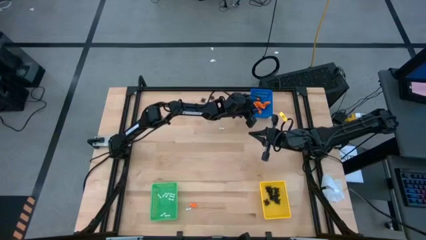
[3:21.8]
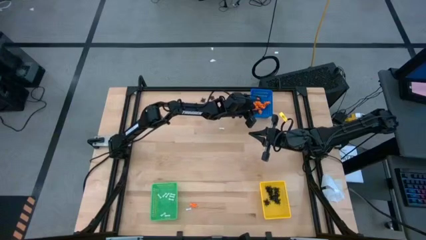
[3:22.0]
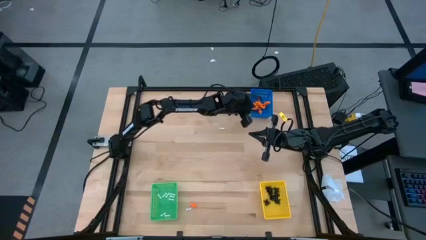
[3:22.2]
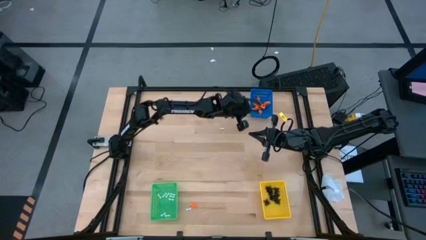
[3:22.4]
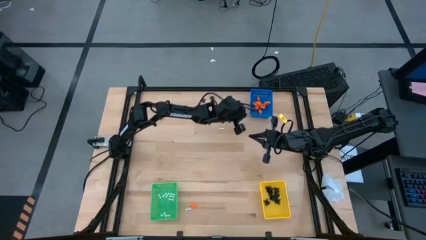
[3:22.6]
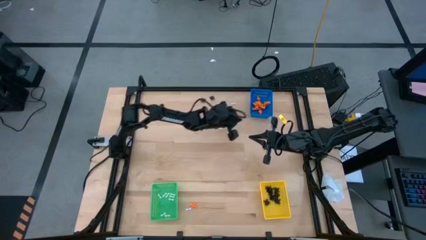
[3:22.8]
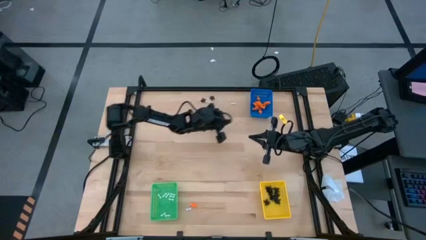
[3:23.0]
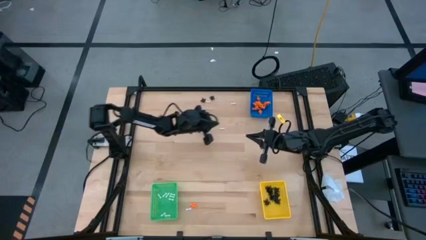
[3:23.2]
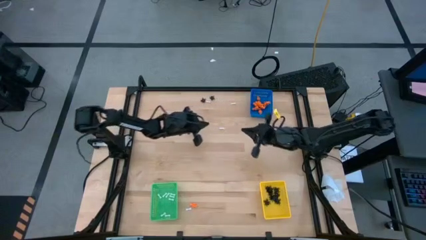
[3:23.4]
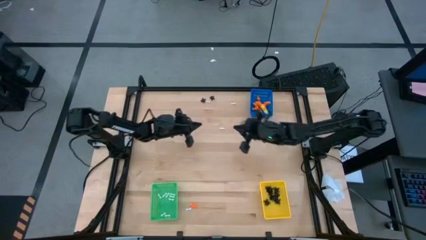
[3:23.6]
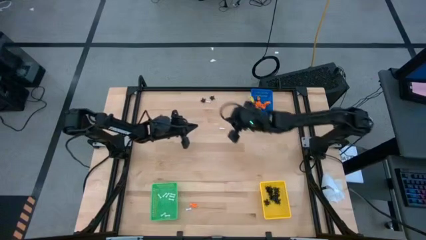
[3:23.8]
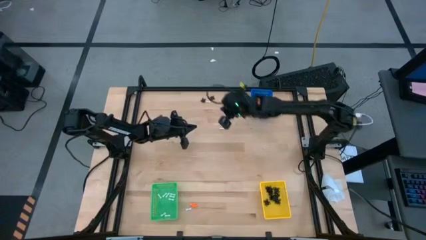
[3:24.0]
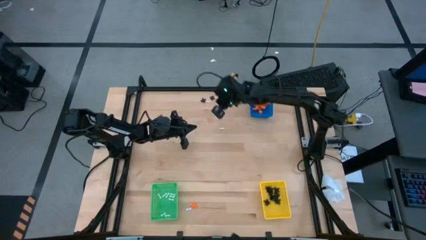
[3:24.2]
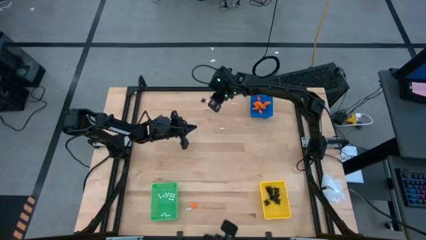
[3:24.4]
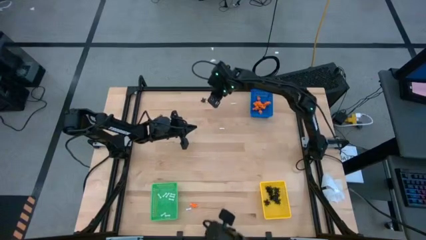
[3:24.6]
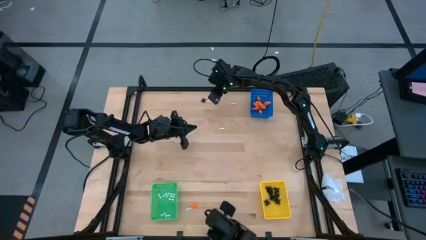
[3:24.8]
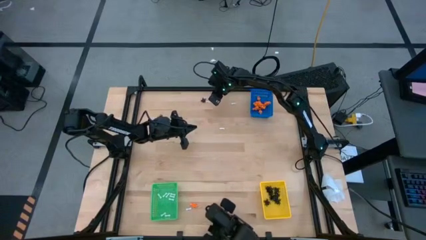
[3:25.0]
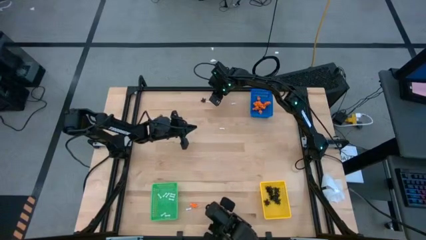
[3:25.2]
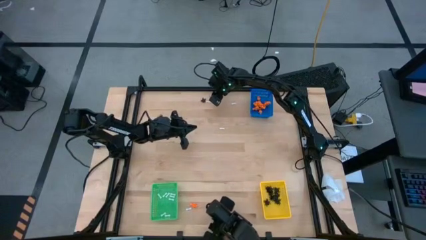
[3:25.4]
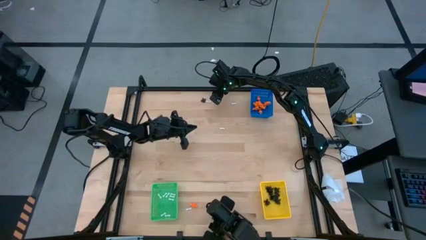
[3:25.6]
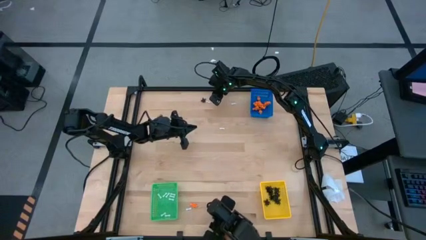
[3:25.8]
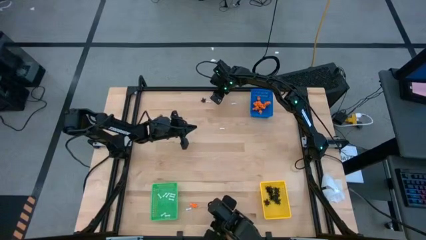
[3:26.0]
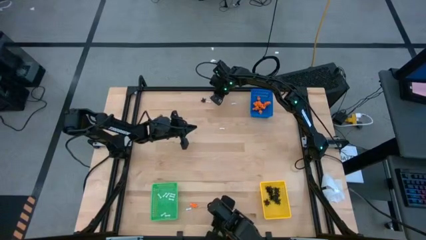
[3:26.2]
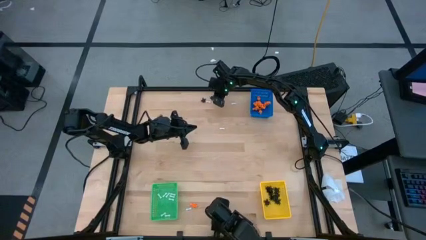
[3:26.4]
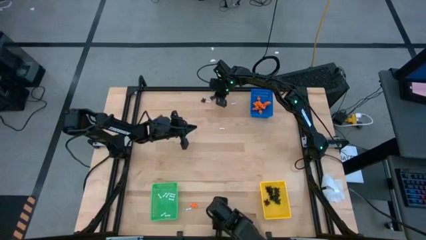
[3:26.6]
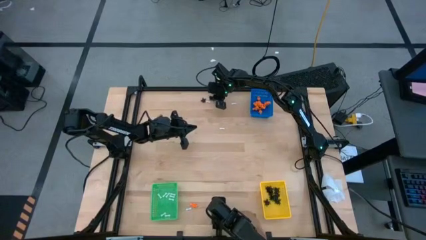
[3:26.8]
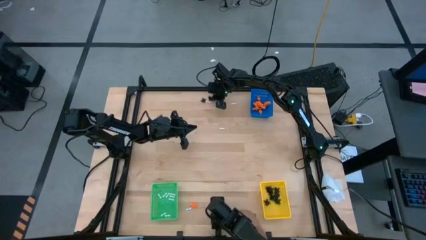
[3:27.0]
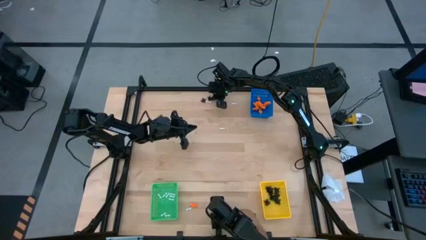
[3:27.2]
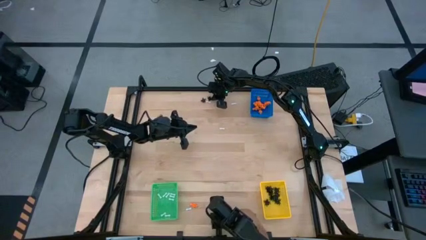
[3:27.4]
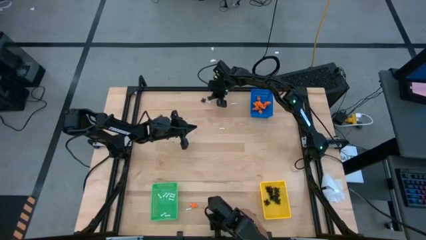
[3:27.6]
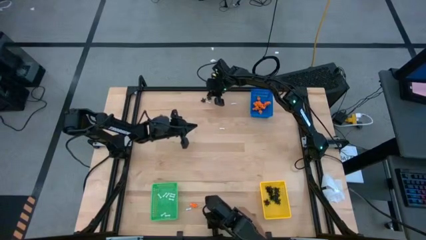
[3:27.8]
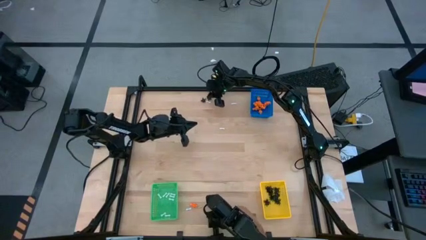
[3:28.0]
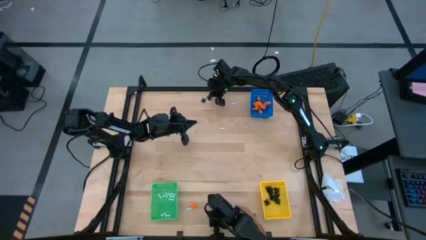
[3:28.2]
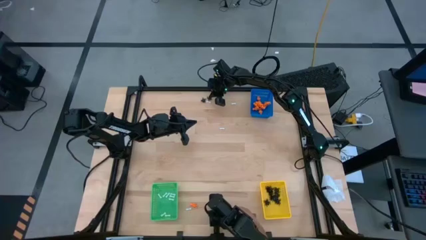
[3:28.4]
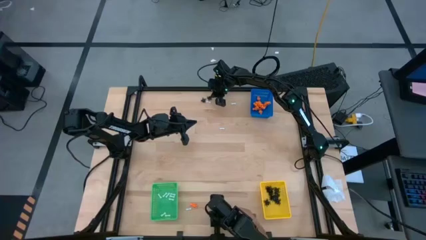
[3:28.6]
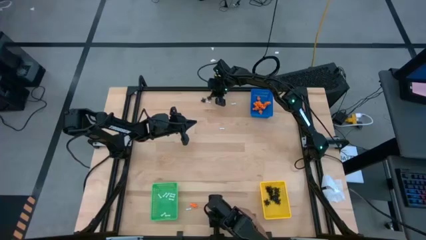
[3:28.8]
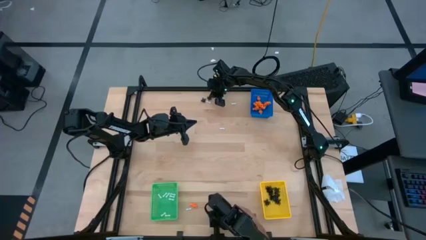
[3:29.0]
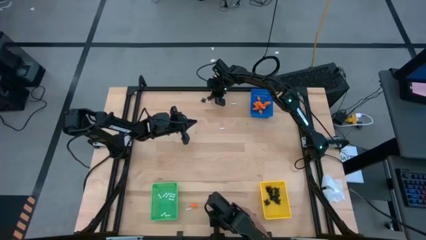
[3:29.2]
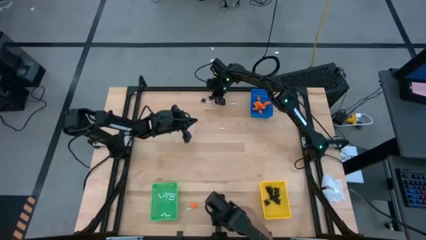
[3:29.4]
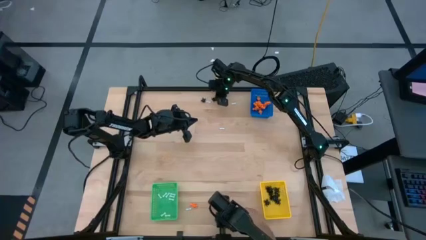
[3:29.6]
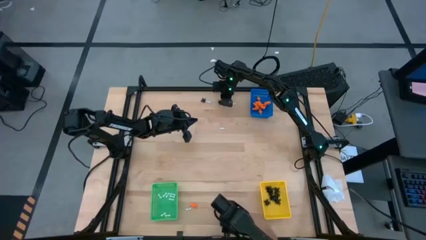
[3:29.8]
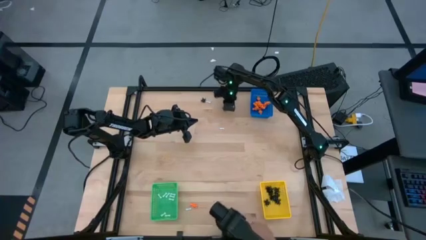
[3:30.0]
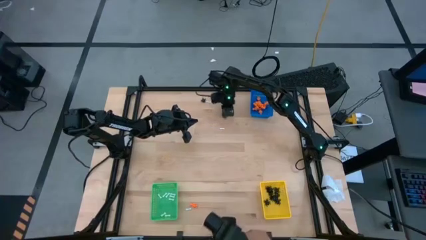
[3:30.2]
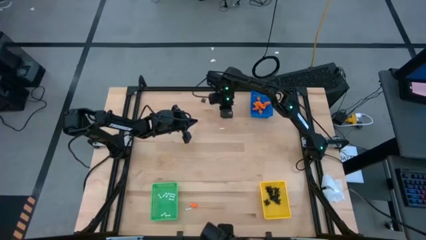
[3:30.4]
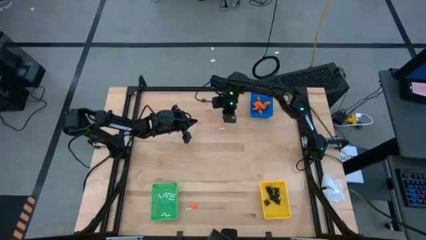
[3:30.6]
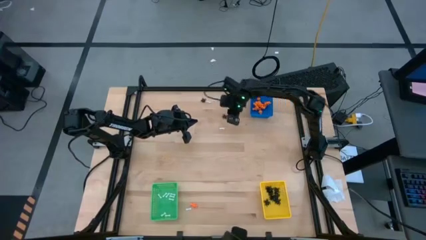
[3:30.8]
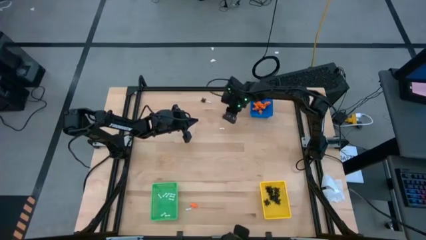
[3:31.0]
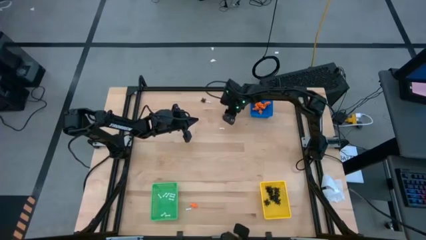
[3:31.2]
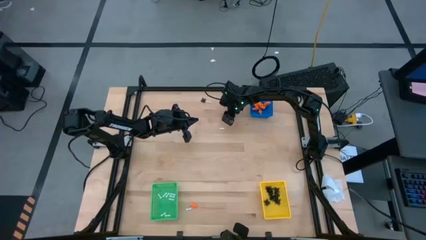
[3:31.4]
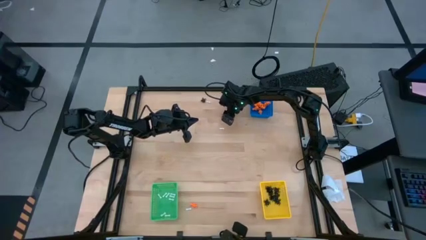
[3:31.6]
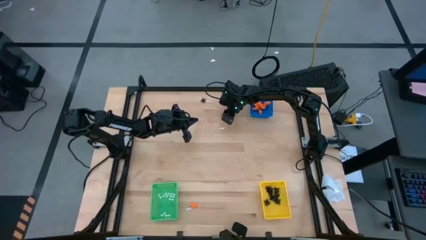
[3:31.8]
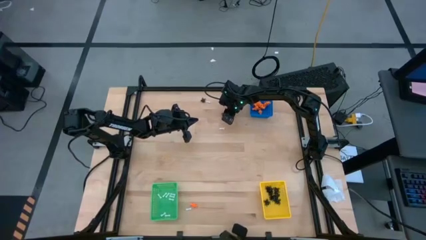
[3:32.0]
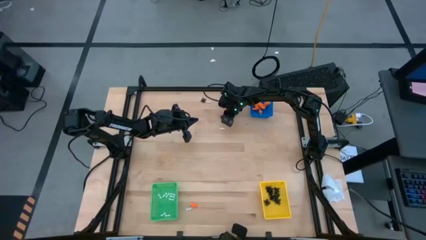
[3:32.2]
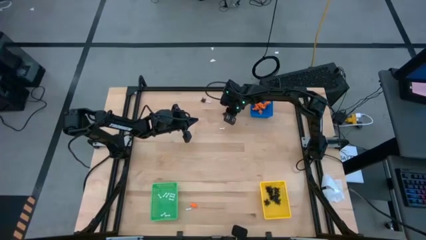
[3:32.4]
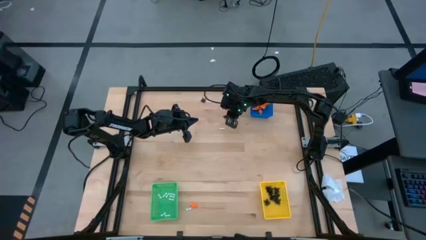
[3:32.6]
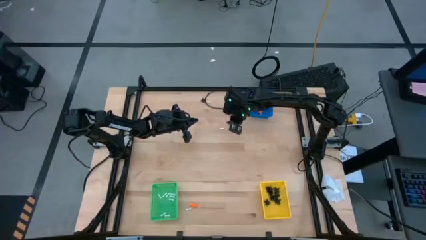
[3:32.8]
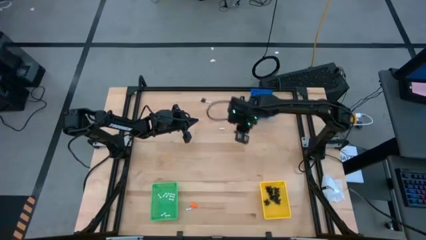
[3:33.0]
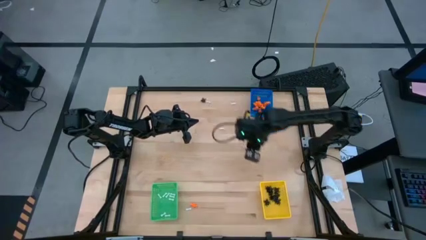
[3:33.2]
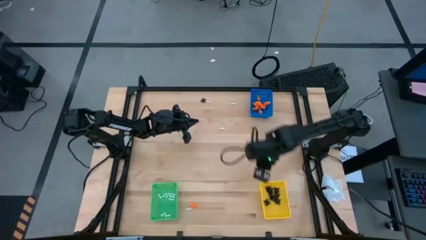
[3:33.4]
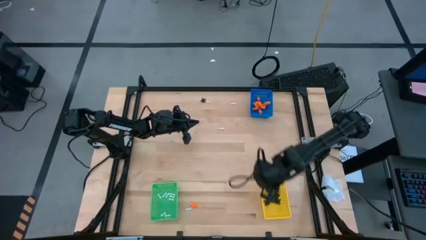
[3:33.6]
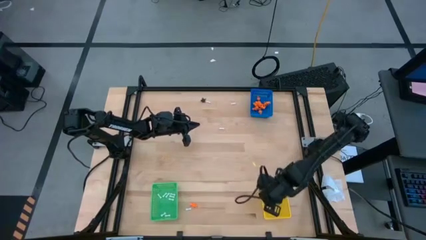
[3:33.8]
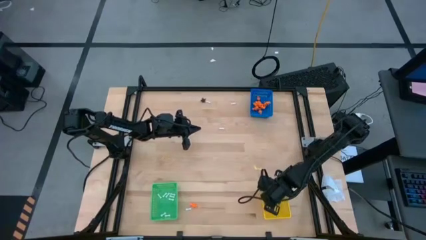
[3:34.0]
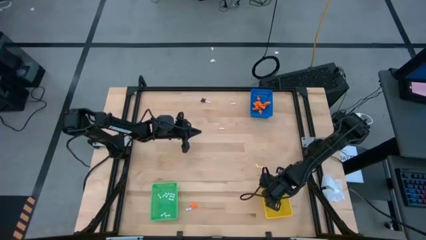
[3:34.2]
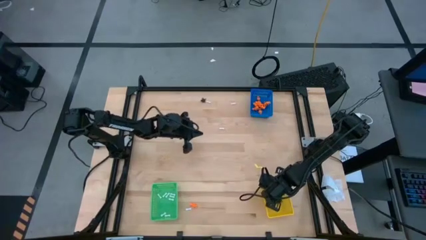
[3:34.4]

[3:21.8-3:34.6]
Task: Sort Halloween decoration
Put the black spider toy into the yellow bin

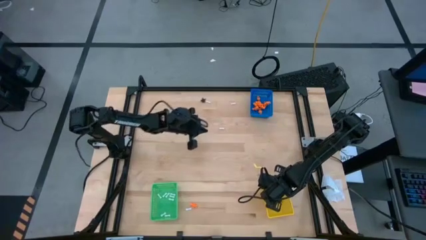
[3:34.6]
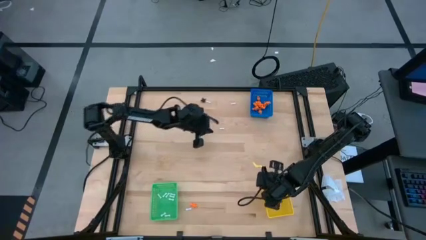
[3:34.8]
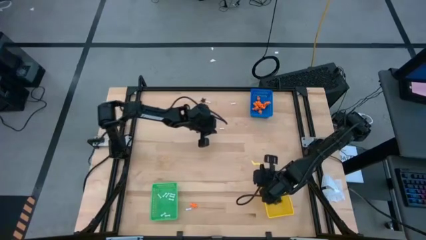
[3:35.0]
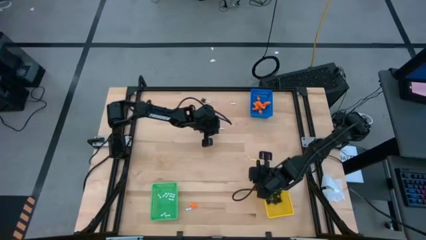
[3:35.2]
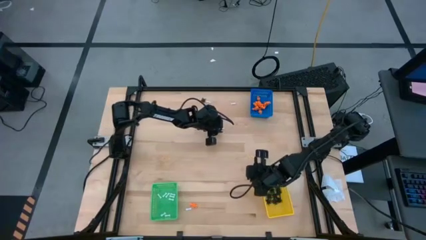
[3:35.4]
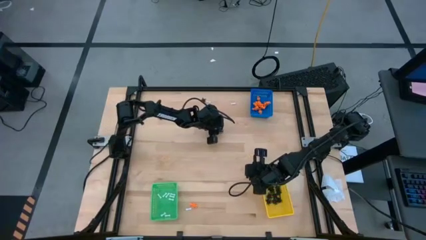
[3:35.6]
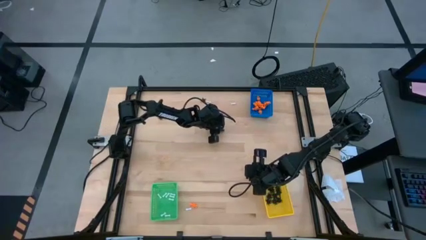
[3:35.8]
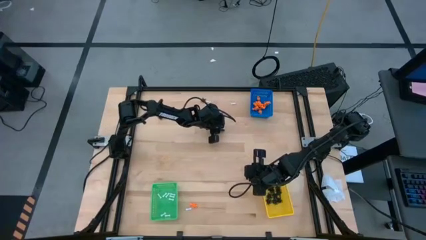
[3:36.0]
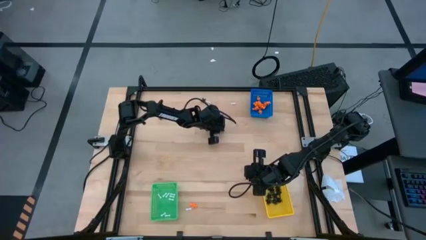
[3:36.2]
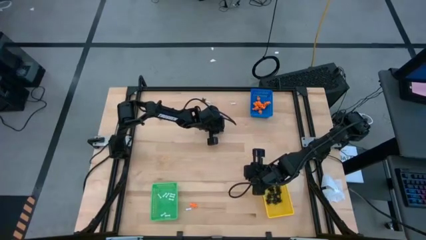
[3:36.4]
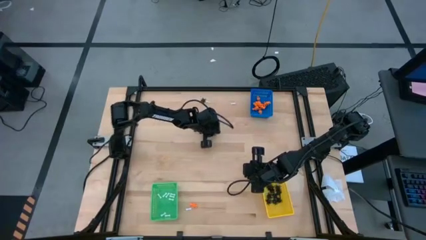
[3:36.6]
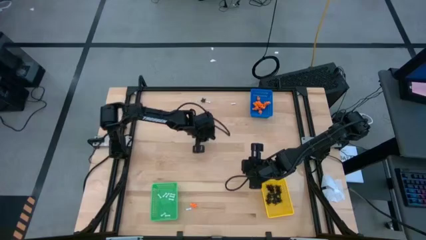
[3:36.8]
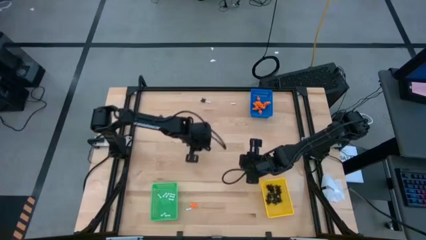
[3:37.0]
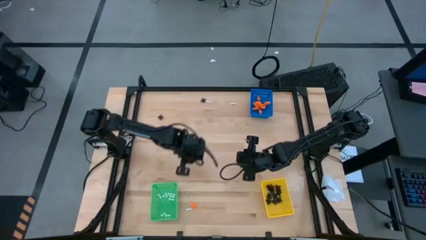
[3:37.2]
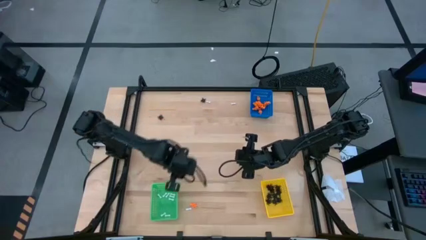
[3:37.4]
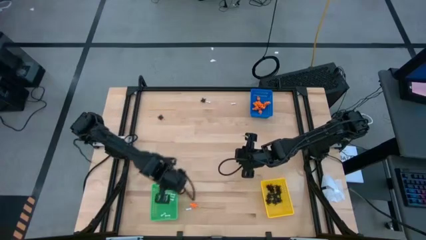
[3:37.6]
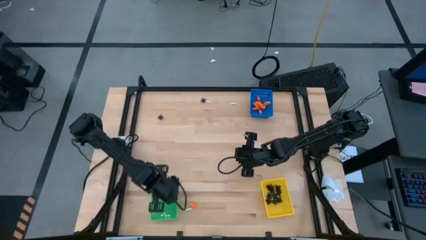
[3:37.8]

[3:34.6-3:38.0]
Put the white bone toy into the green bin
